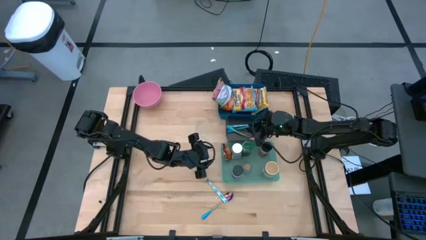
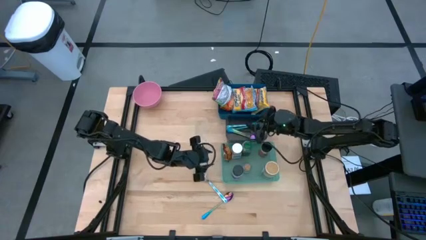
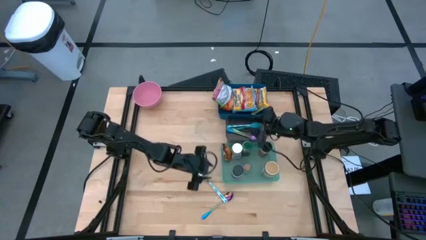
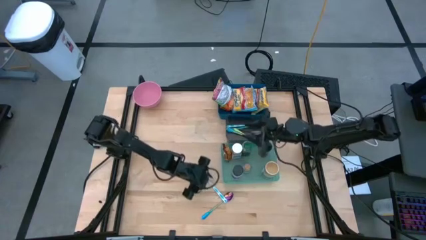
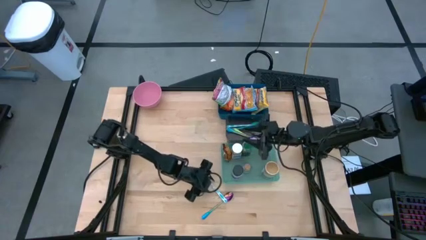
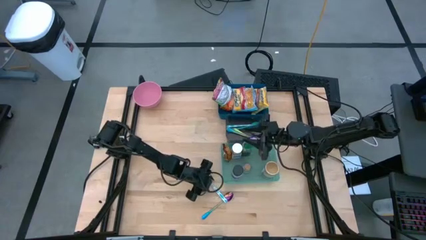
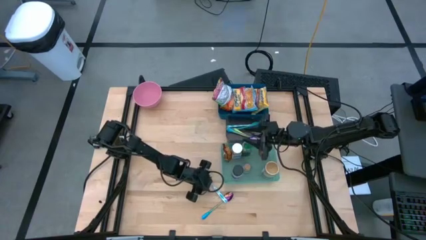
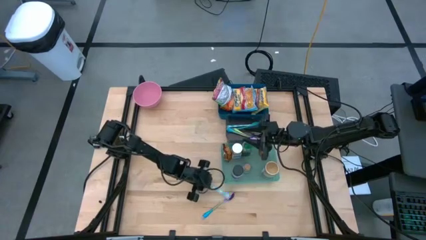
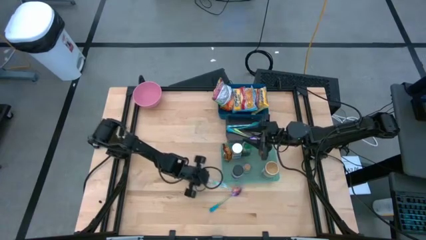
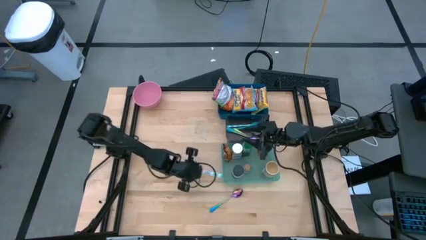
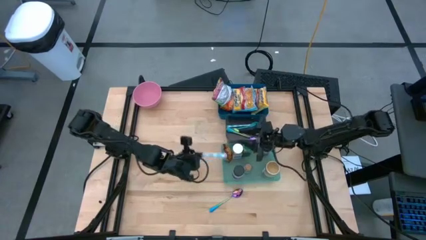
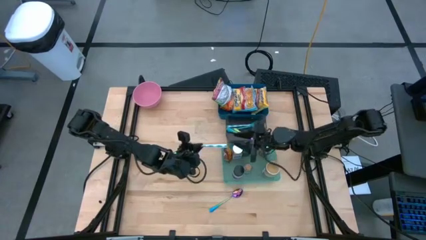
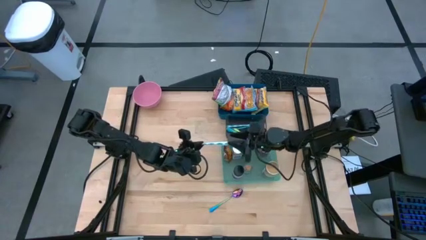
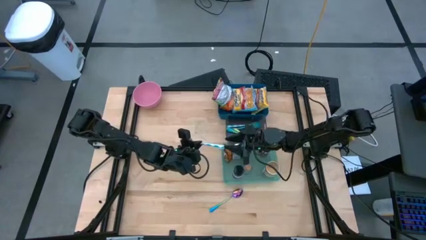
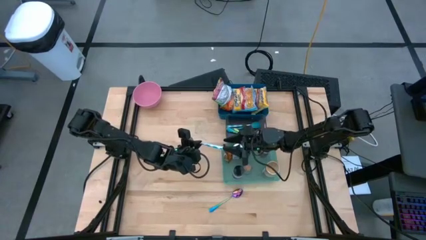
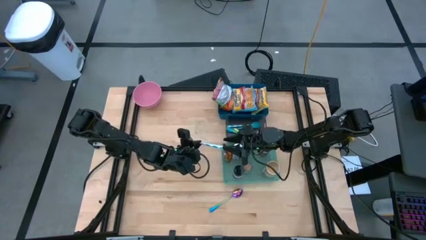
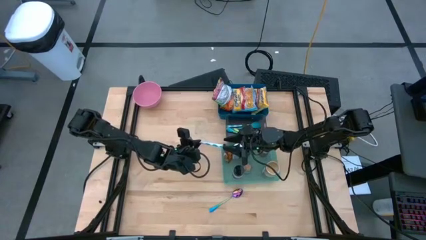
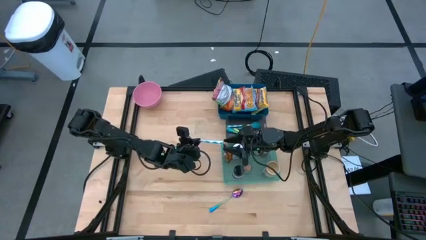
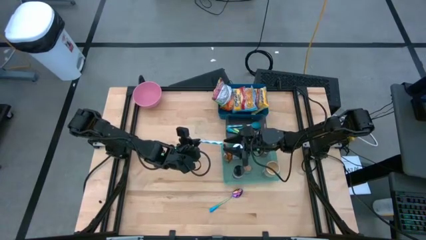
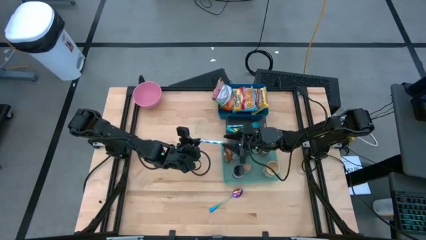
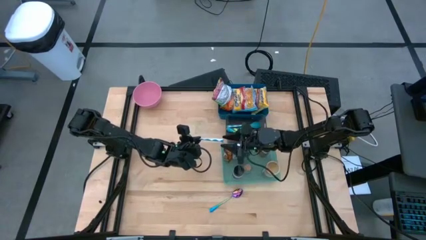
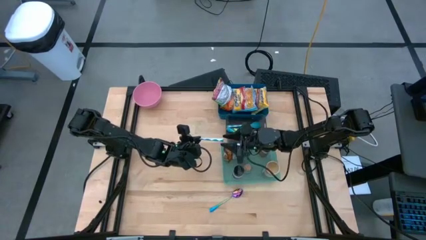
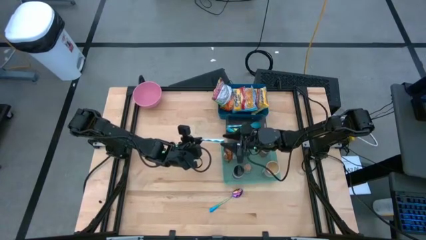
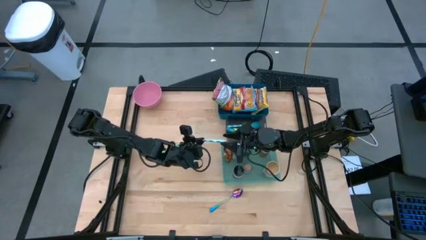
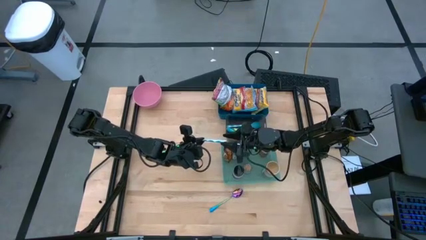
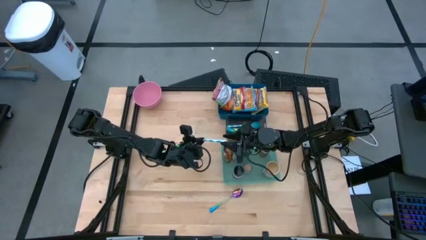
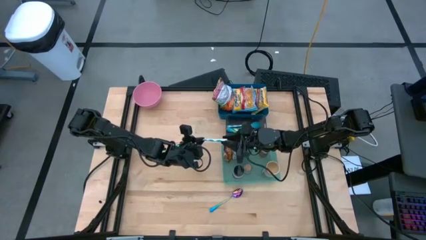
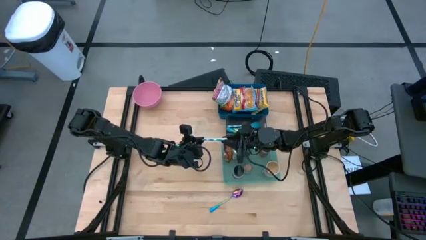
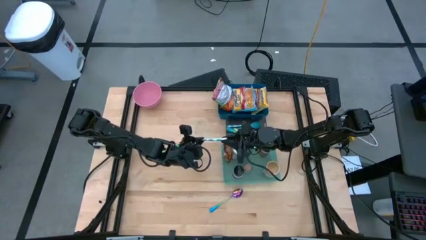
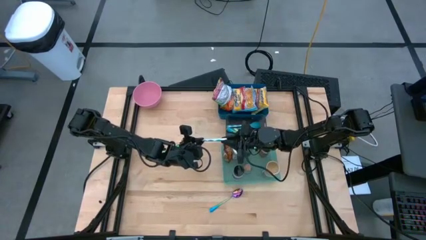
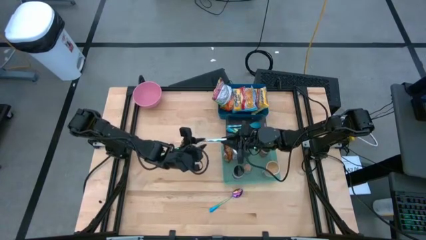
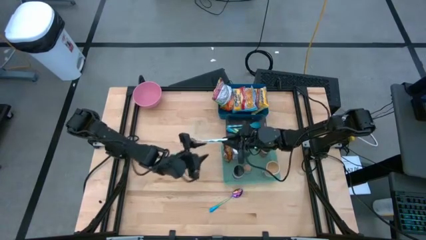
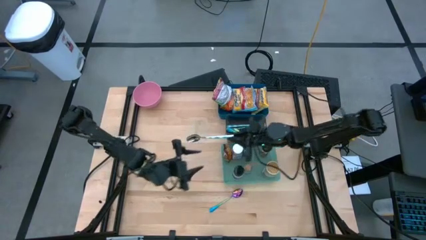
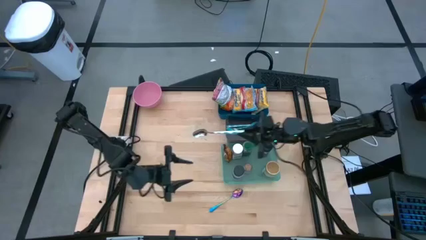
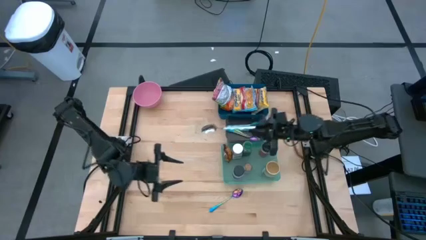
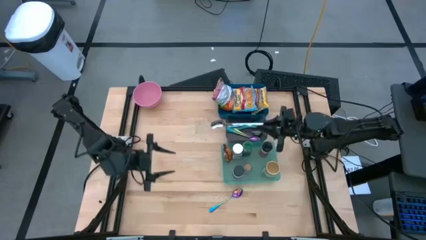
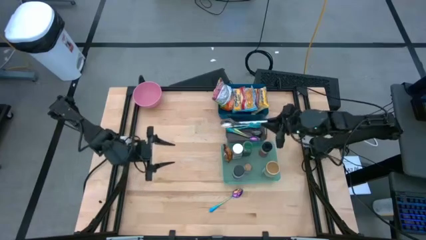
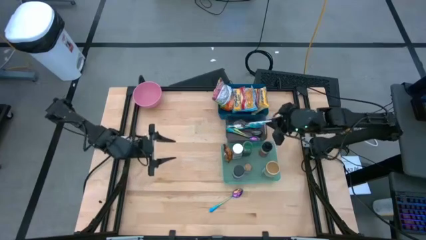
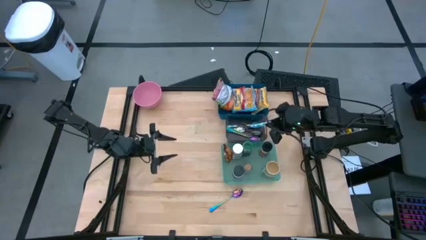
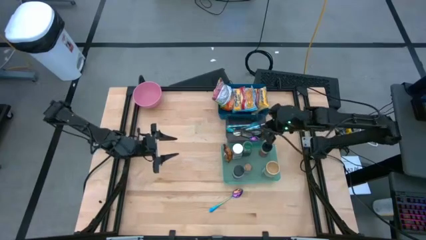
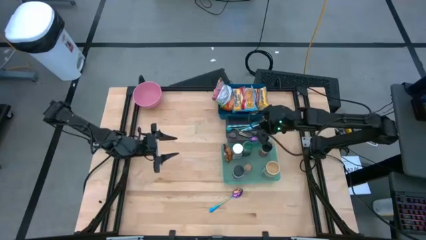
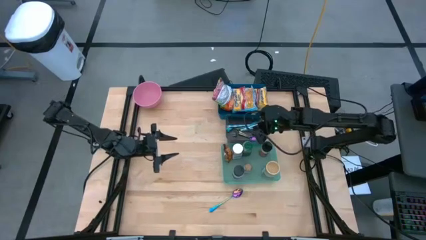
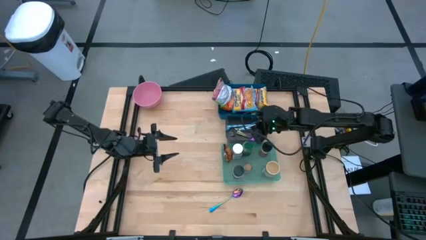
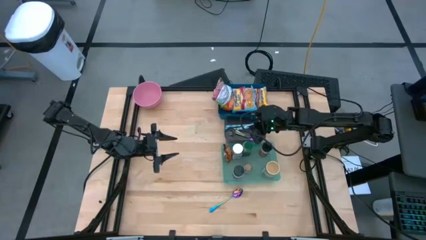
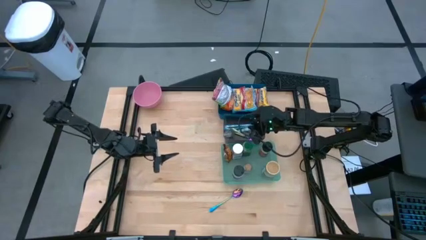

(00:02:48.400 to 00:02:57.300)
Task: Pick & Place Food Item
Put the blue patterned spoon into the black bin

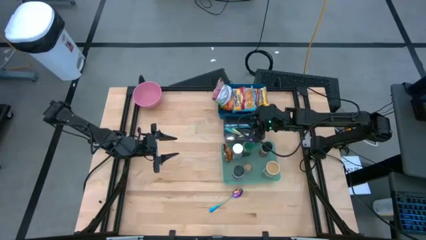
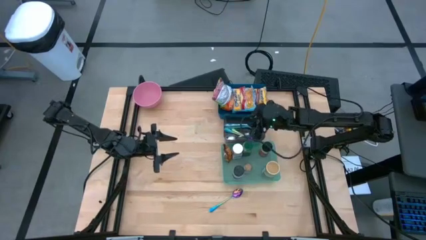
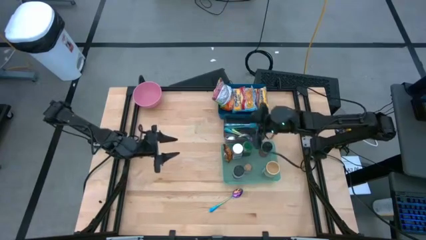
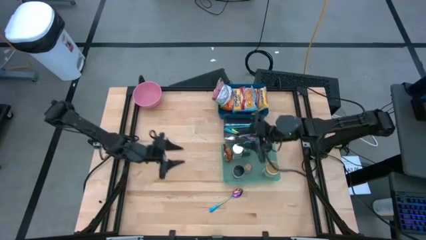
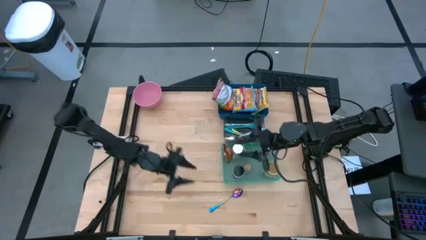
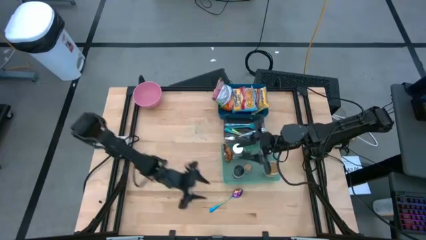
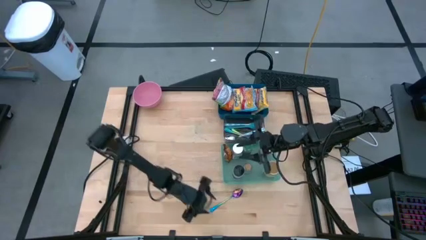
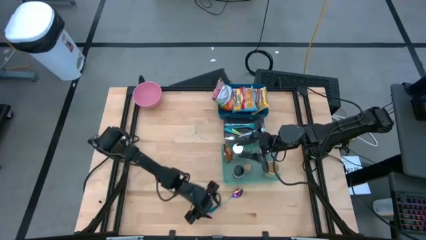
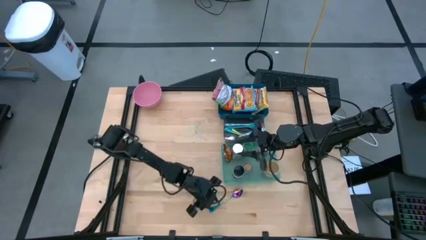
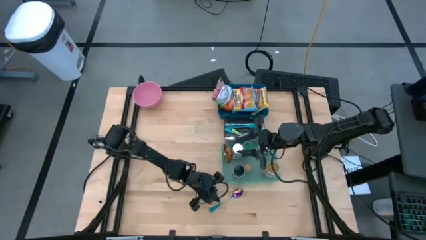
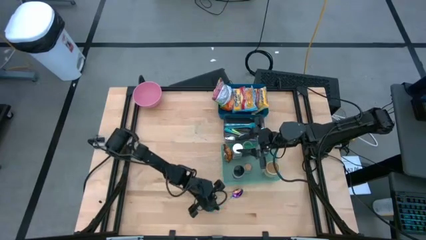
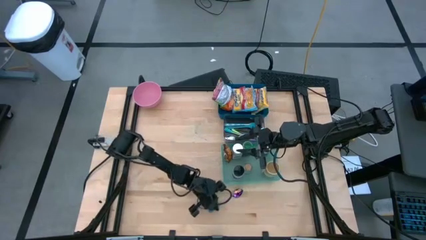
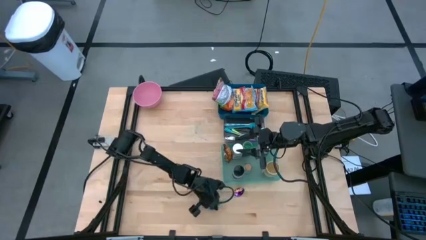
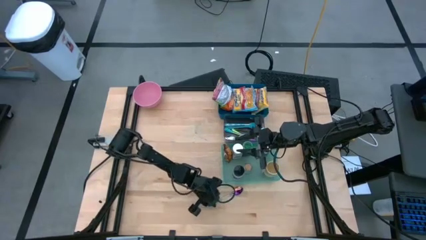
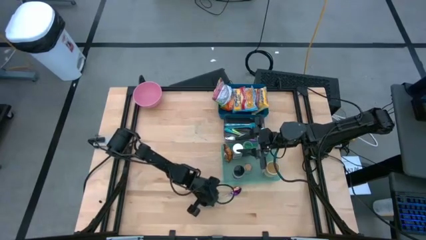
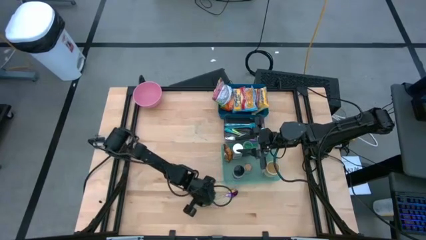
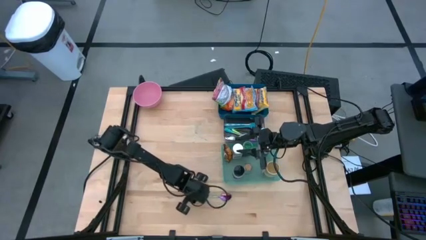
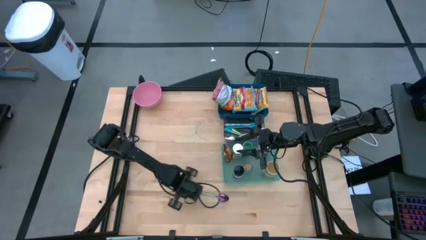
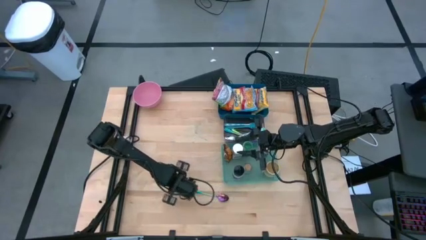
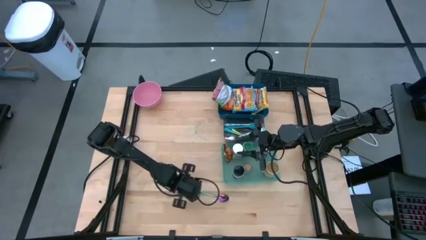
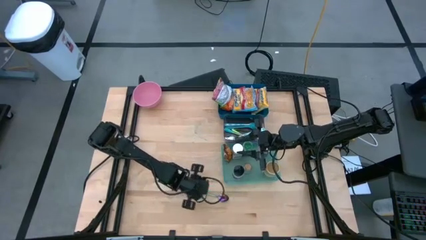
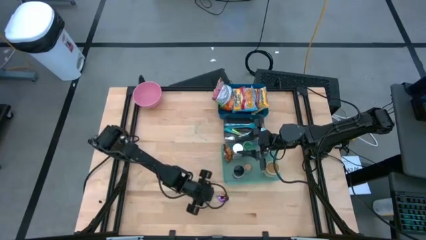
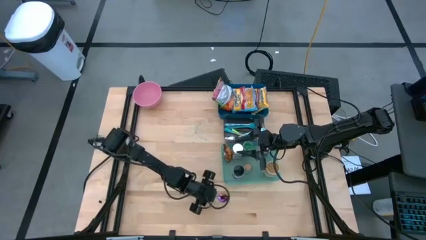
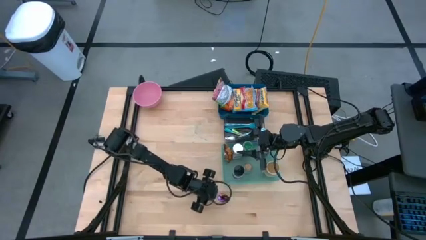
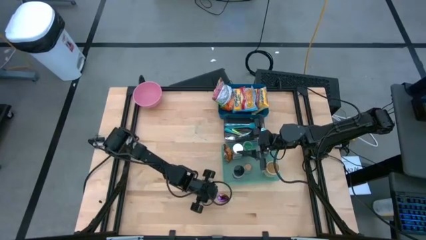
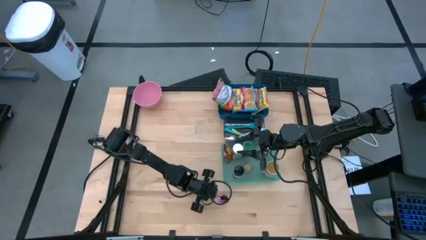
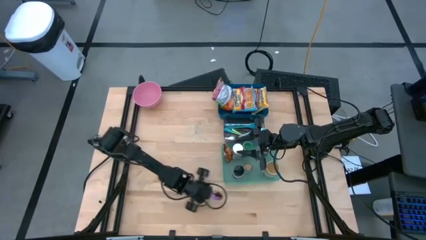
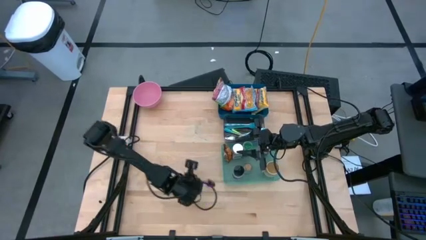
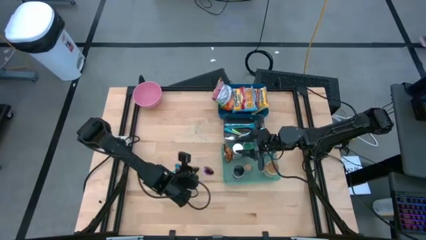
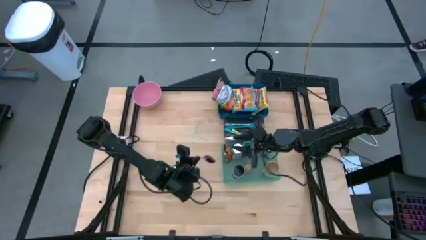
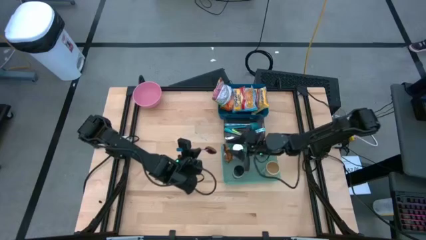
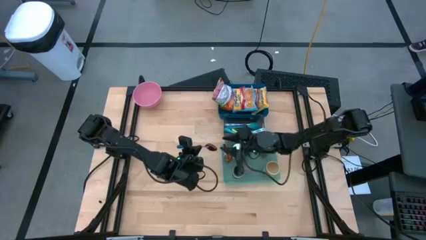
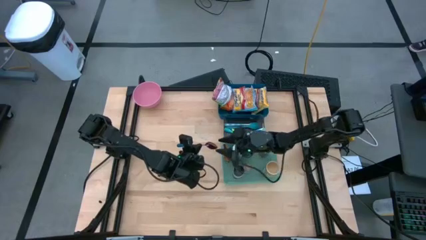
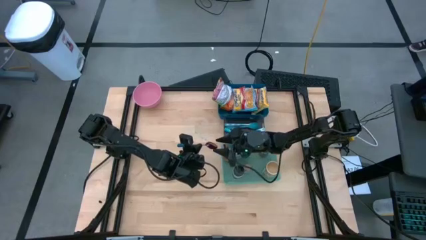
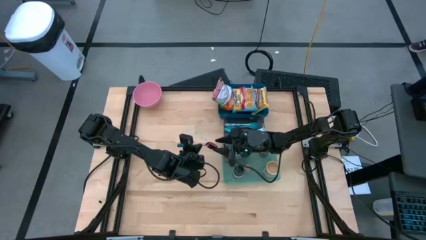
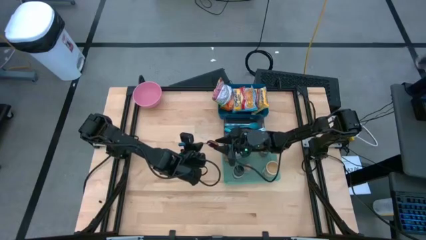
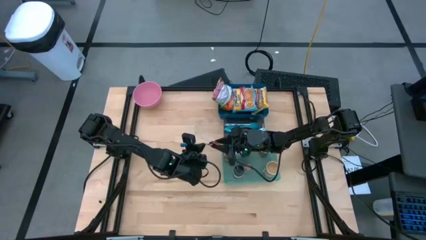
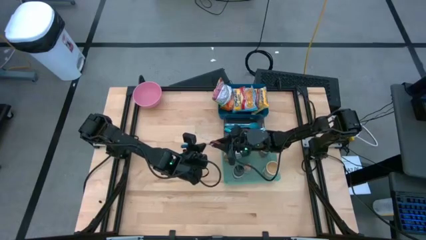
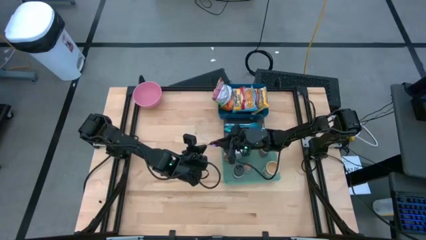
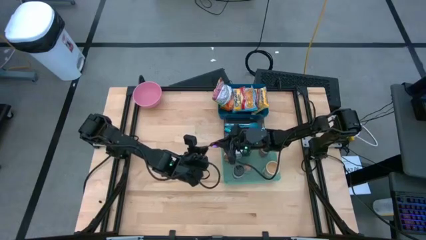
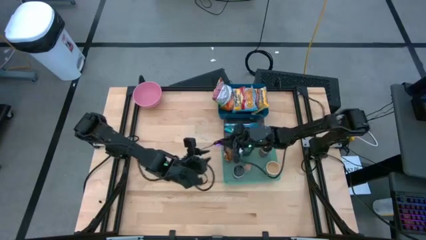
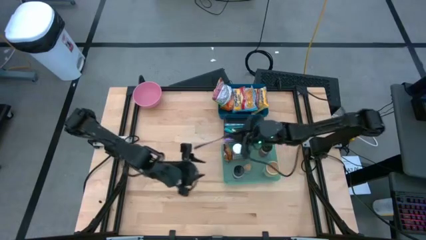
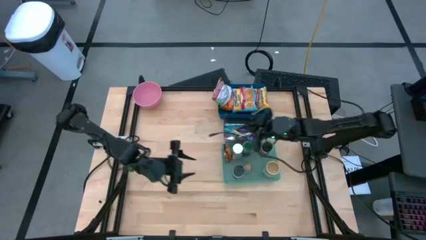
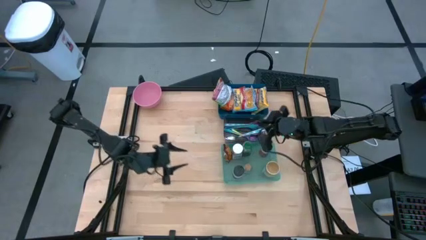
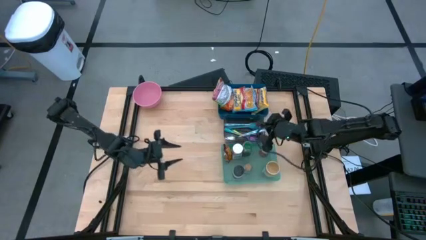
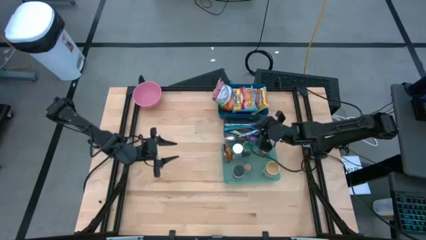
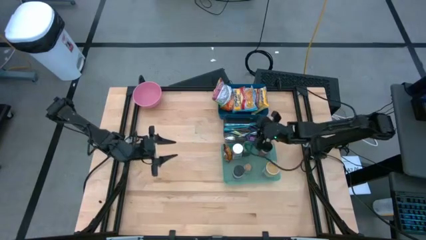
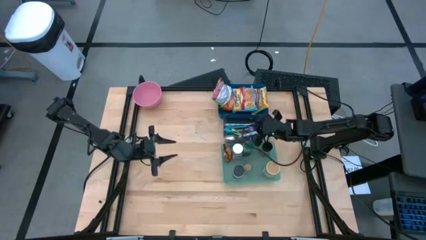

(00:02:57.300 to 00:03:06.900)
Put the purple spoon into the black bin
